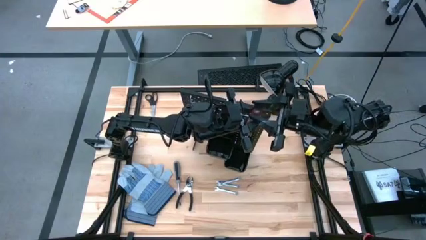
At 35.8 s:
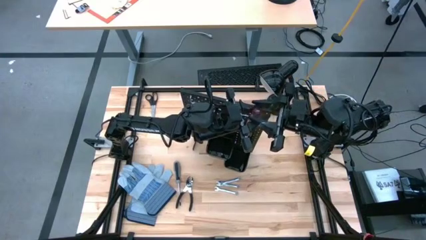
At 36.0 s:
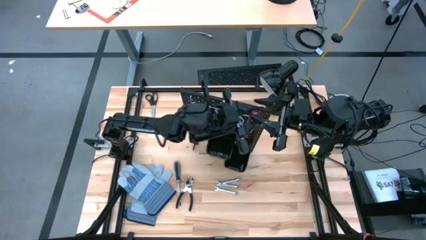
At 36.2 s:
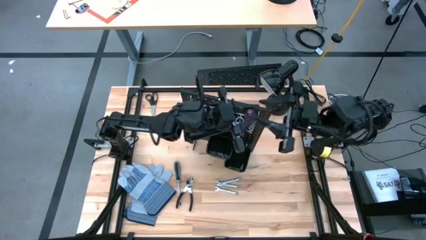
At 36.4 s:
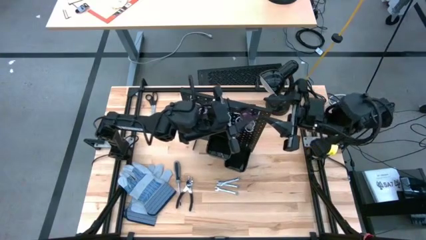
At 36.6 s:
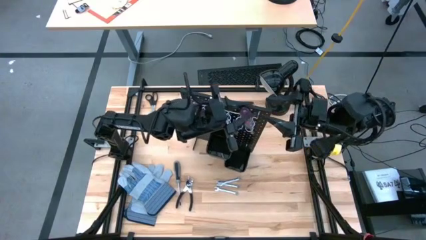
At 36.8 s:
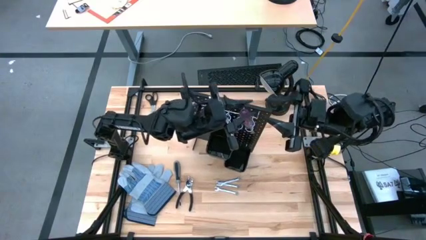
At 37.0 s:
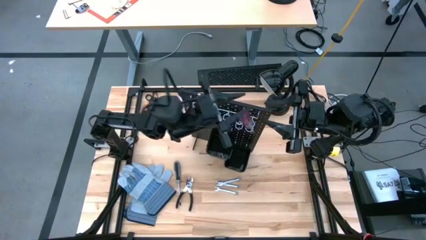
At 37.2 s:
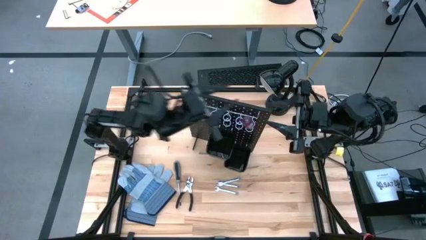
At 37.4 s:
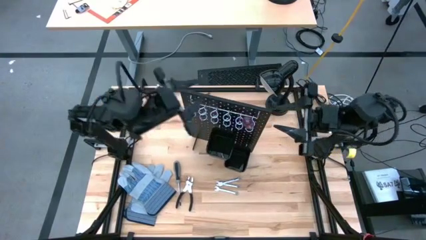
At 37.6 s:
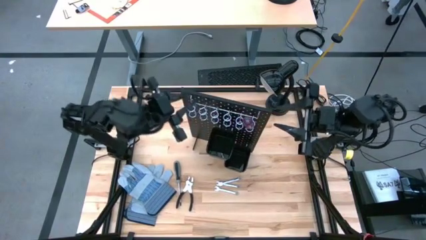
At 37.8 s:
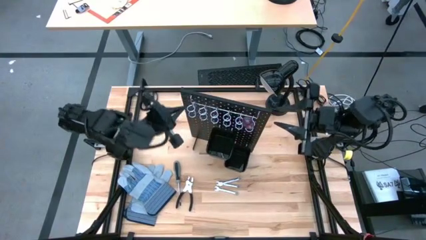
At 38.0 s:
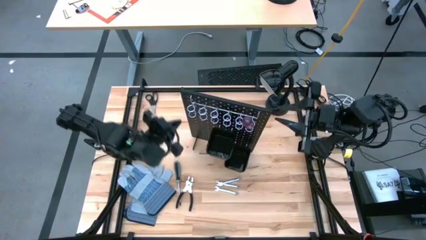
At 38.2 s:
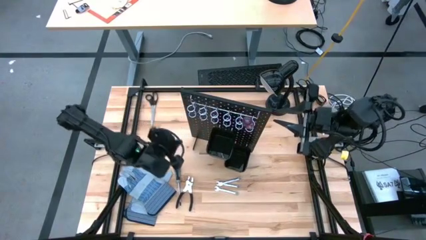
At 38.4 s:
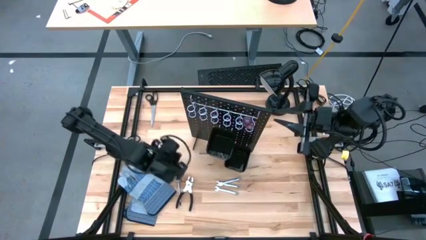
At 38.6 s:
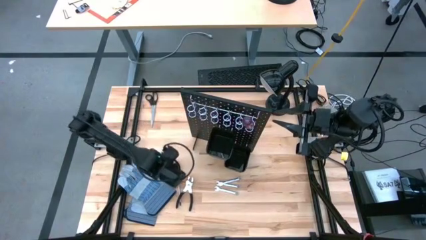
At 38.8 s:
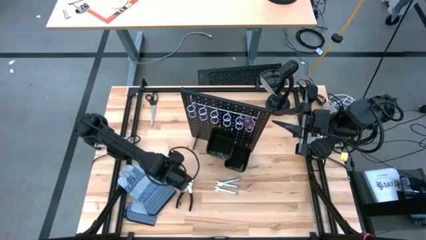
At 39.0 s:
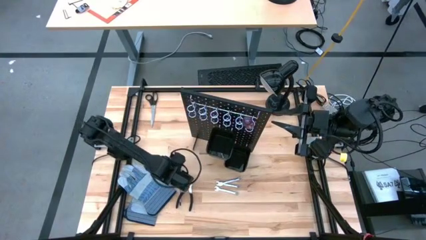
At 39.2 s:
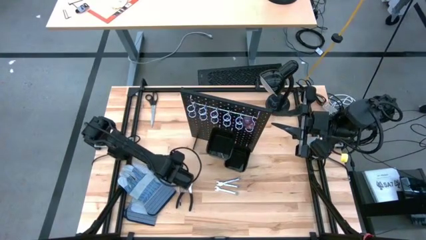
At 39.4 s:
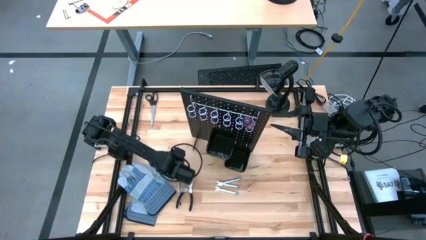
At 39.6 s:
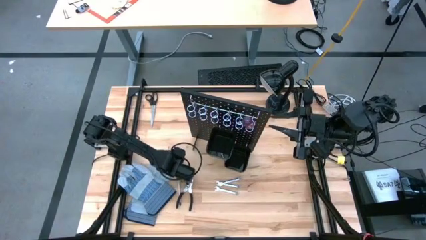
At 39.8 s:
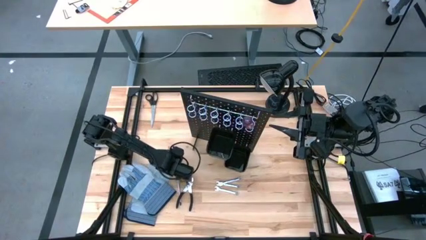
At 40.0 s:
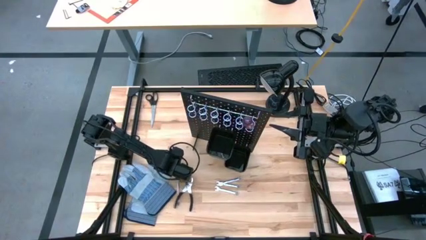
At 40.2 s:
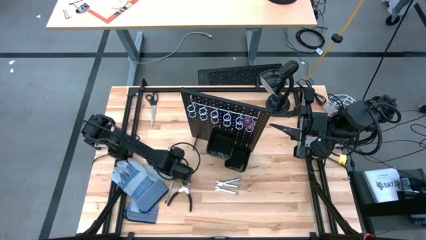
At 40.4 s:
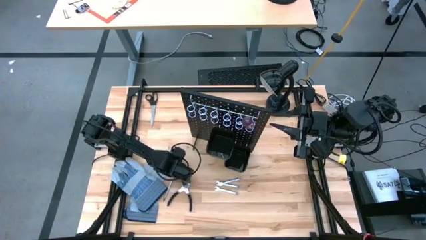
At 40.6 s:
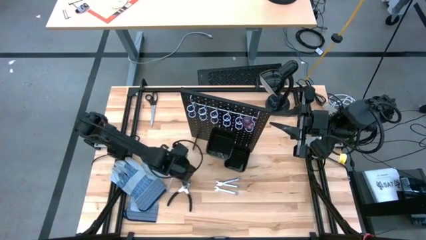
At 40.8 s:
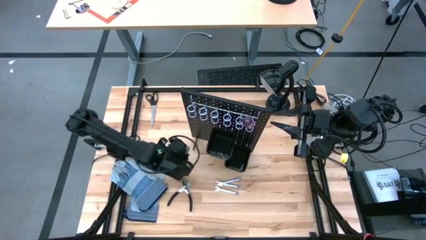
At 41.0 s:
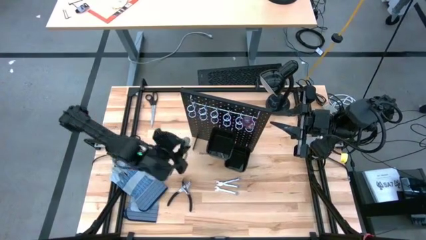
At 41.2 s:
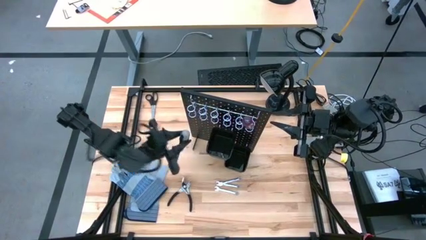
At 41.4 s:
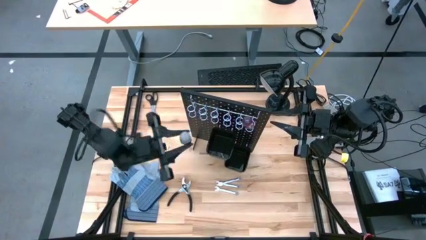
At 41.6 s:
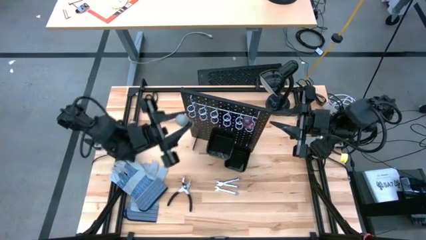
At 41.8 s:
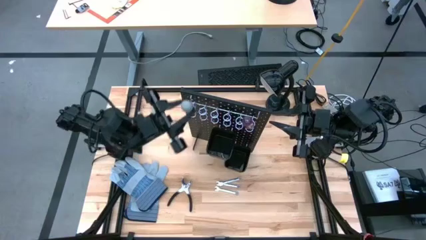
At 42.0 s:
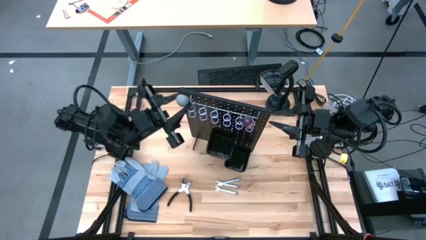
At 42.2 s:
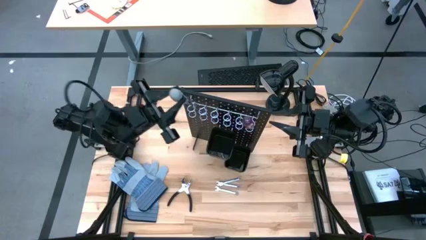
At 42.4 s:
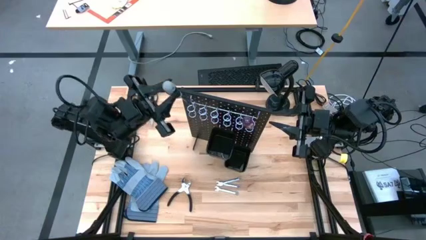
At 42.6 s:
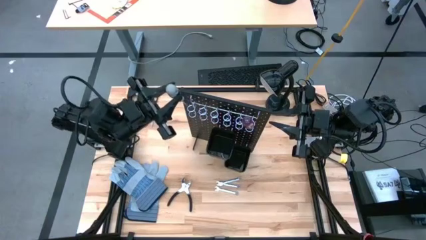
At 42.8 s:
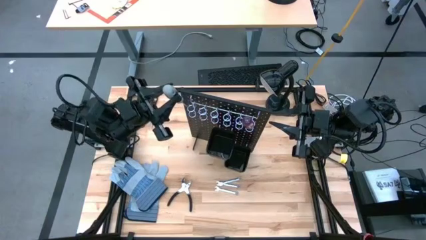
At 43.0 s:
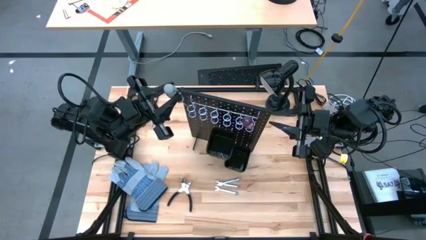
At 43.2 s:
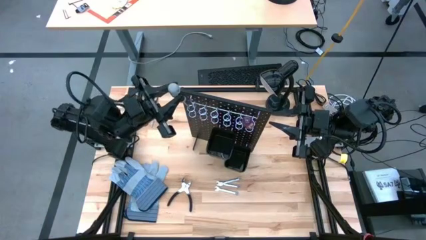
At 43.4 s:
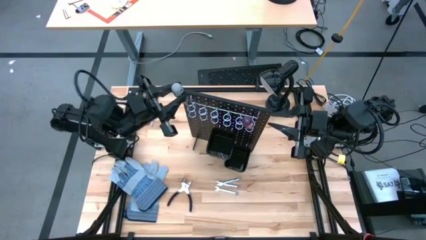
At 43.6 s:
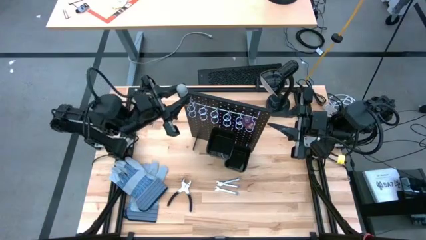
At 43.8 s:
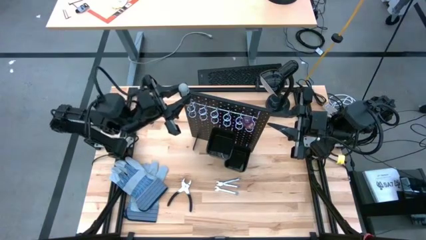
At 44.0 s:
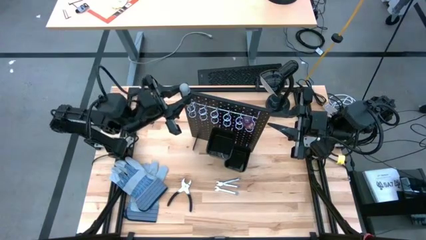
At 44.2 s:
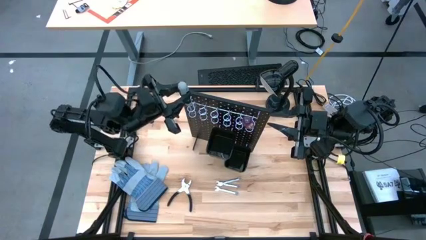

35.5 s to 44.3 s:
Task: Hang tools onto peg board
Hang the gray screwdriver on the black peg board
